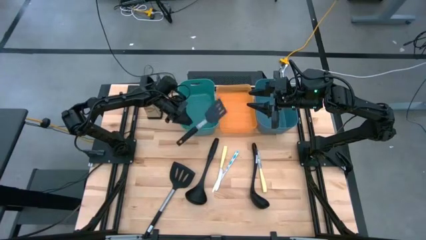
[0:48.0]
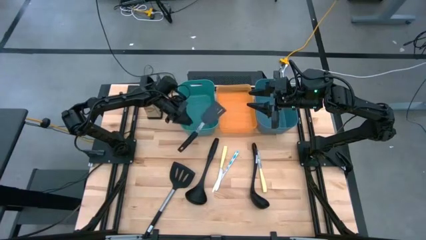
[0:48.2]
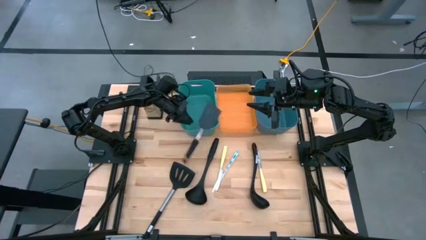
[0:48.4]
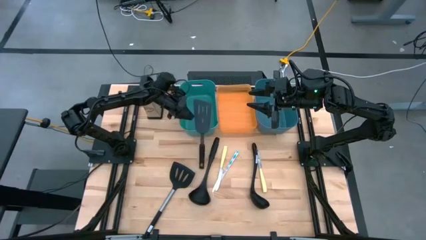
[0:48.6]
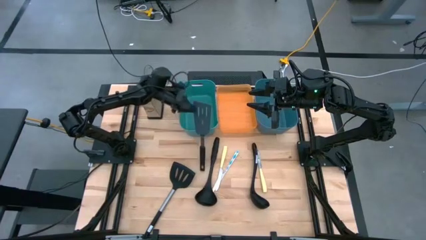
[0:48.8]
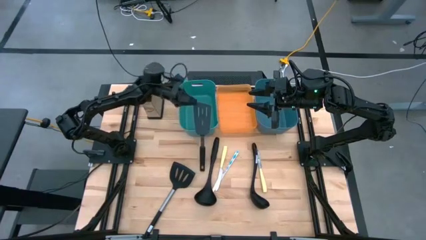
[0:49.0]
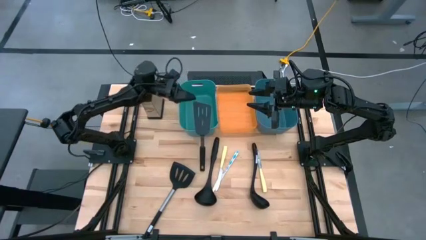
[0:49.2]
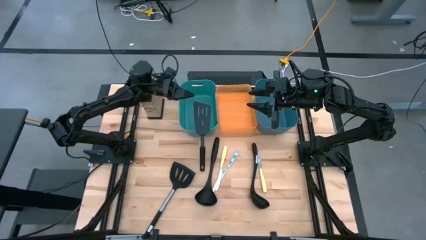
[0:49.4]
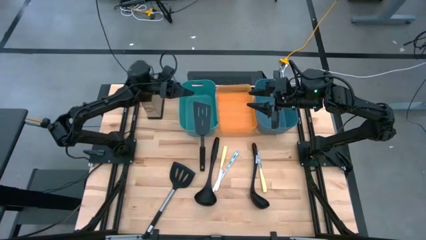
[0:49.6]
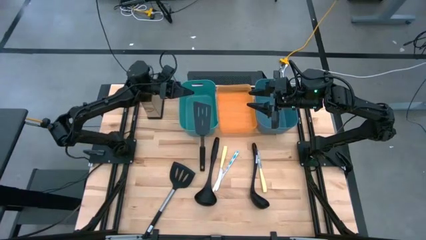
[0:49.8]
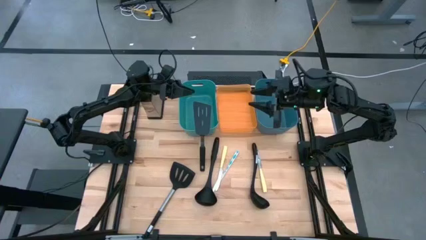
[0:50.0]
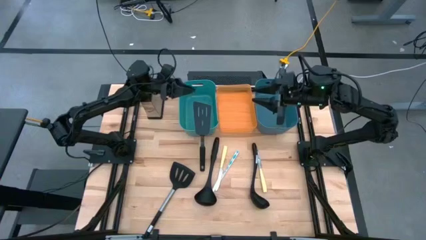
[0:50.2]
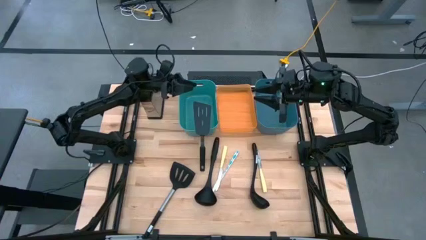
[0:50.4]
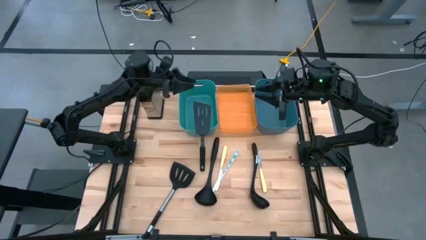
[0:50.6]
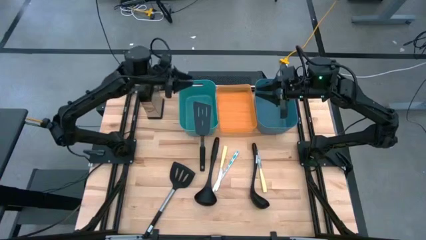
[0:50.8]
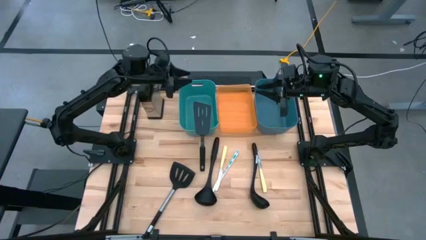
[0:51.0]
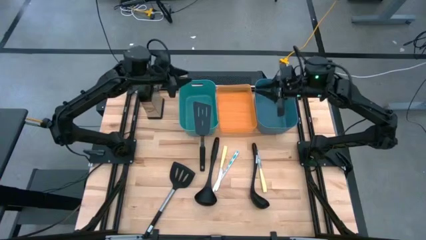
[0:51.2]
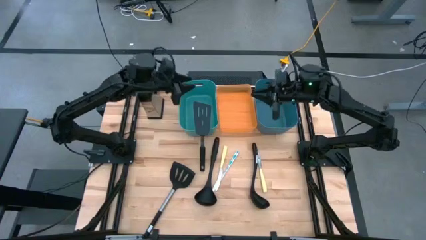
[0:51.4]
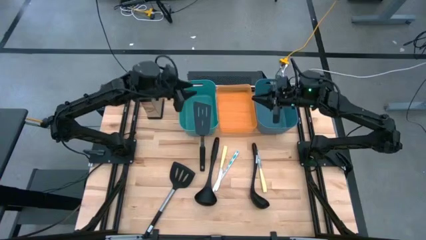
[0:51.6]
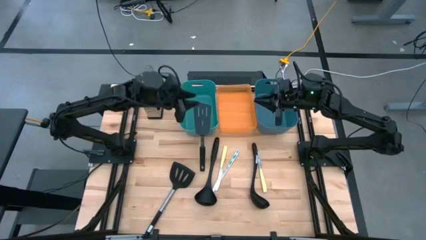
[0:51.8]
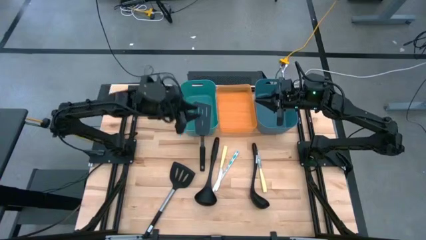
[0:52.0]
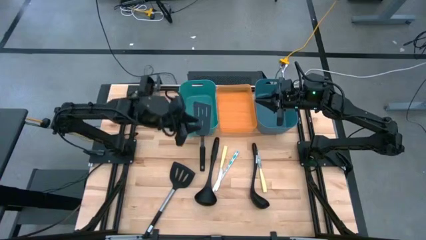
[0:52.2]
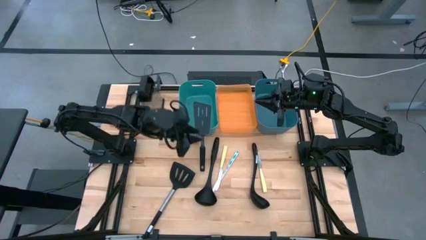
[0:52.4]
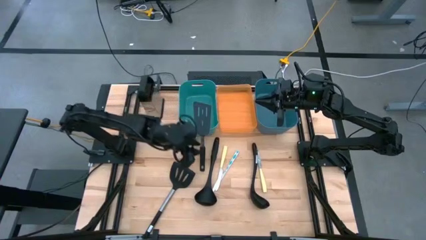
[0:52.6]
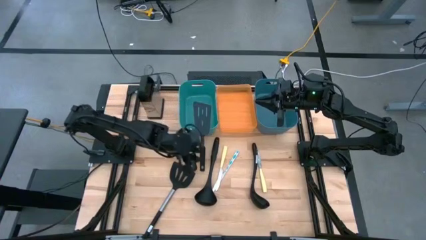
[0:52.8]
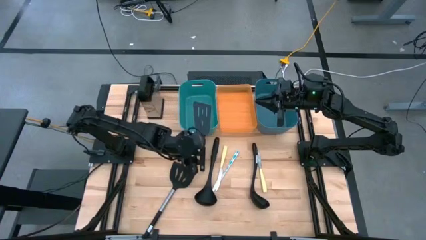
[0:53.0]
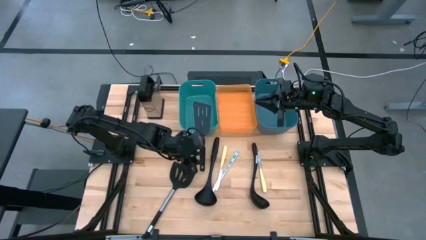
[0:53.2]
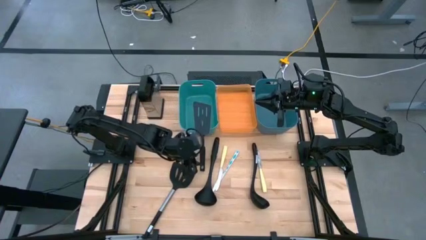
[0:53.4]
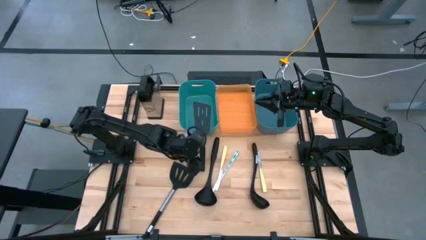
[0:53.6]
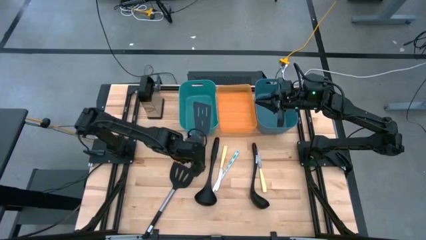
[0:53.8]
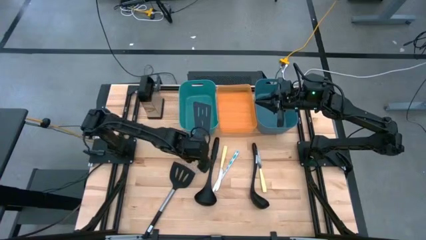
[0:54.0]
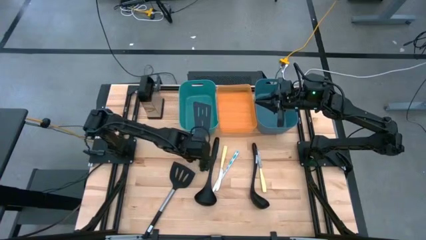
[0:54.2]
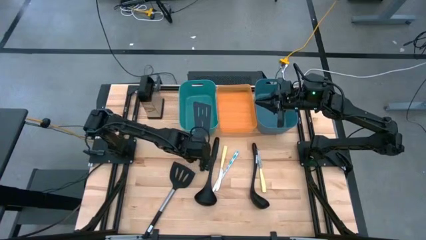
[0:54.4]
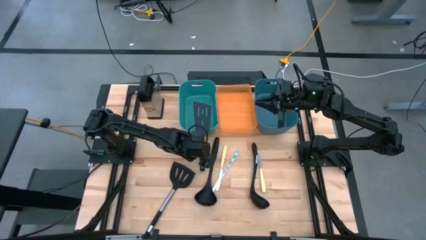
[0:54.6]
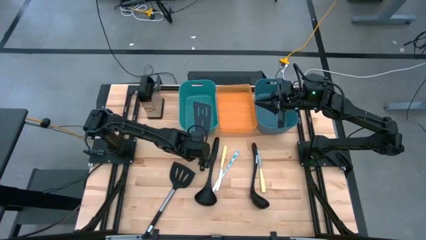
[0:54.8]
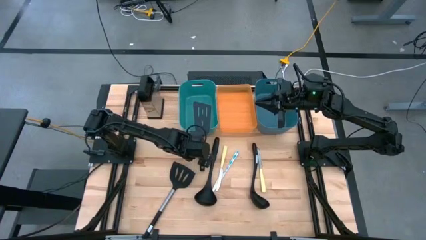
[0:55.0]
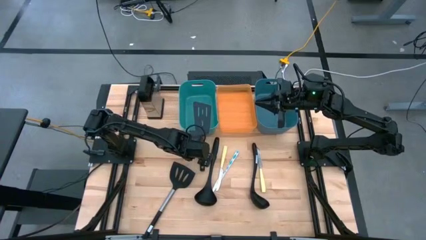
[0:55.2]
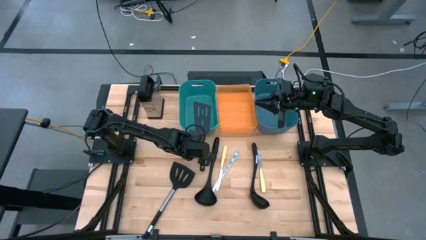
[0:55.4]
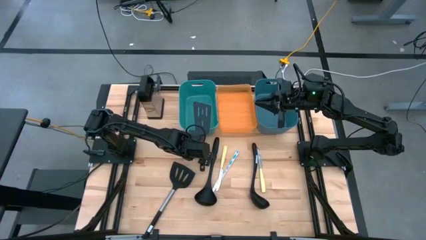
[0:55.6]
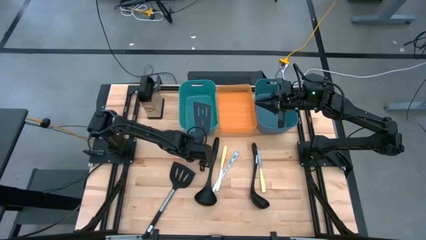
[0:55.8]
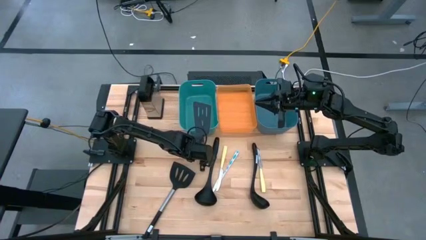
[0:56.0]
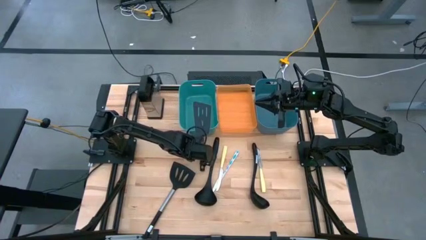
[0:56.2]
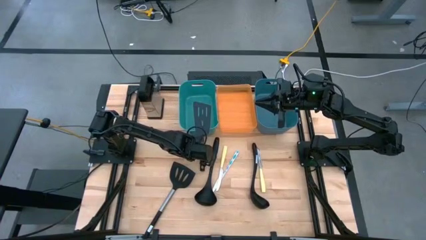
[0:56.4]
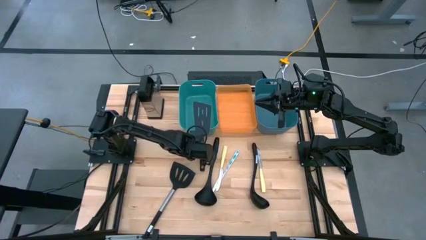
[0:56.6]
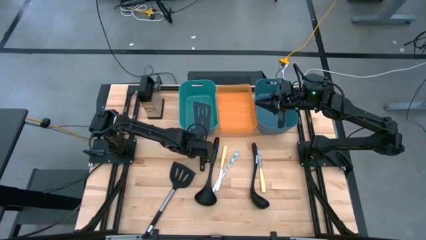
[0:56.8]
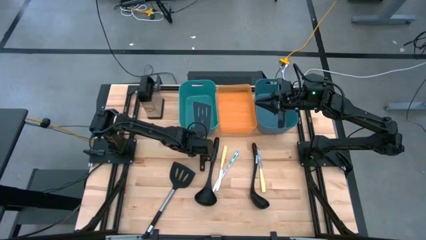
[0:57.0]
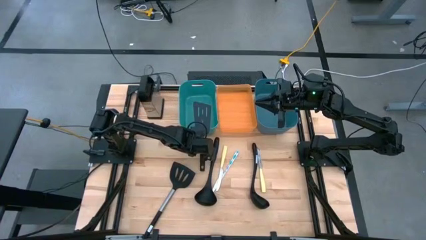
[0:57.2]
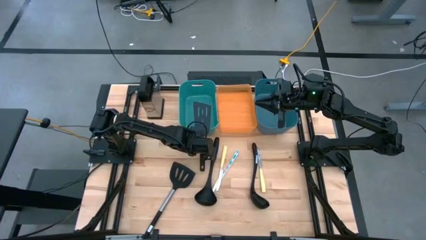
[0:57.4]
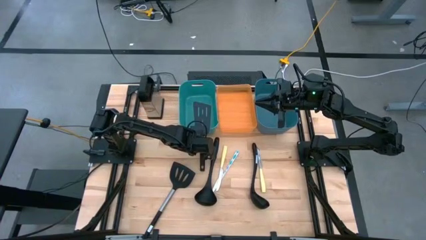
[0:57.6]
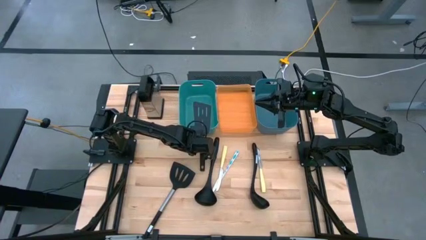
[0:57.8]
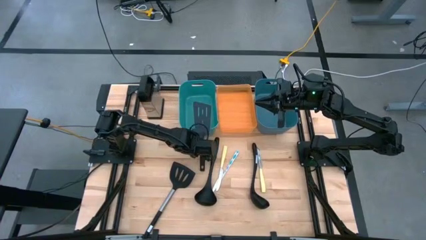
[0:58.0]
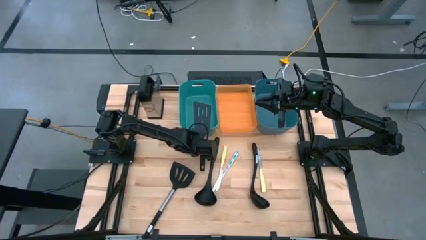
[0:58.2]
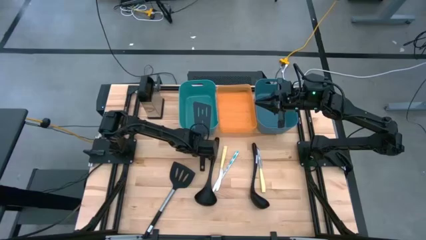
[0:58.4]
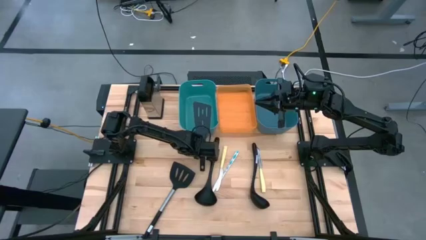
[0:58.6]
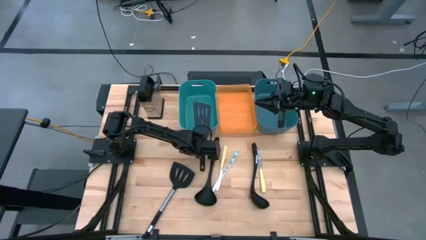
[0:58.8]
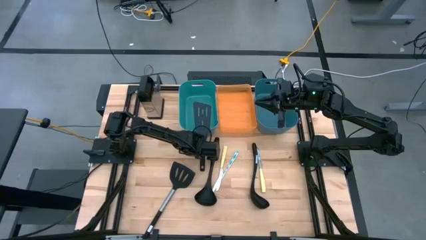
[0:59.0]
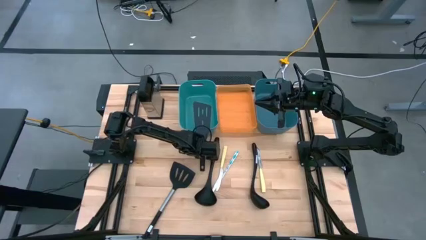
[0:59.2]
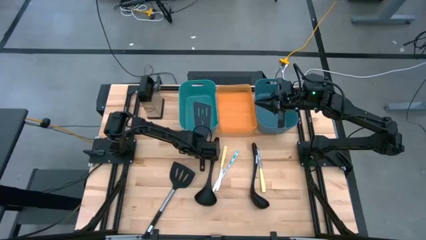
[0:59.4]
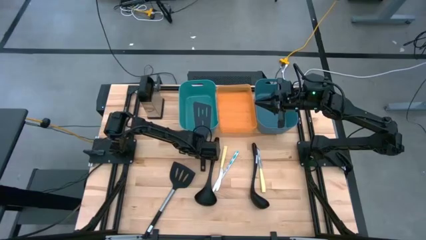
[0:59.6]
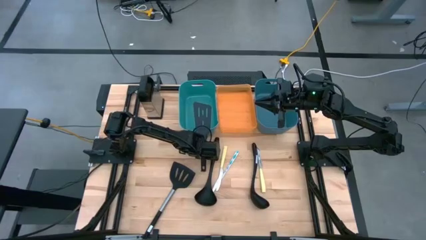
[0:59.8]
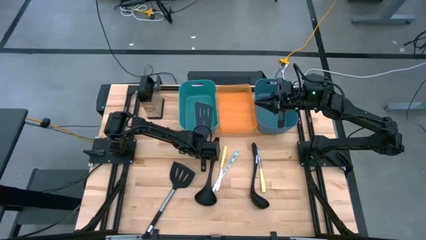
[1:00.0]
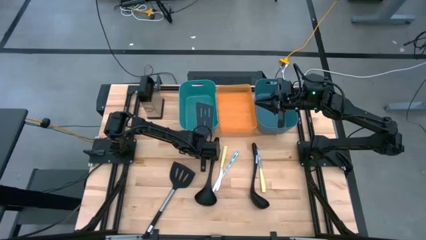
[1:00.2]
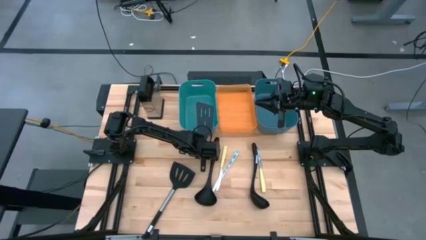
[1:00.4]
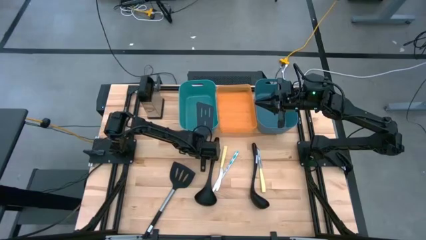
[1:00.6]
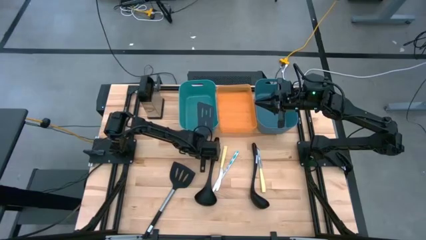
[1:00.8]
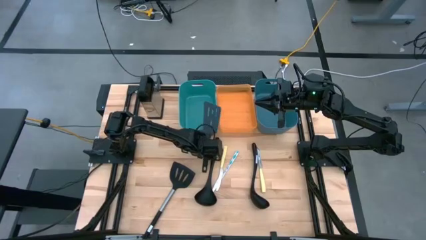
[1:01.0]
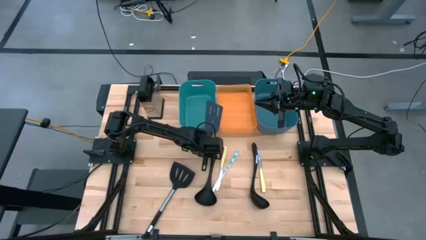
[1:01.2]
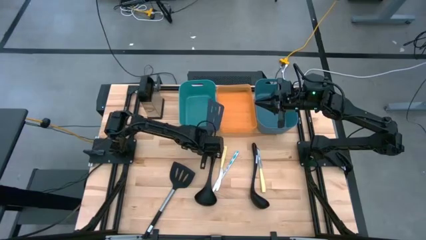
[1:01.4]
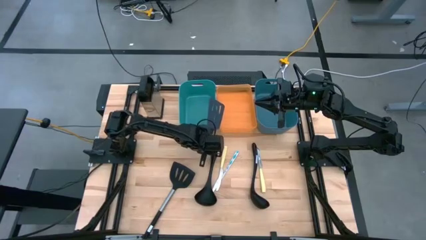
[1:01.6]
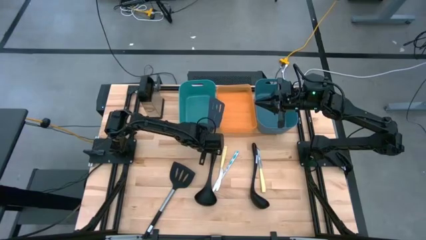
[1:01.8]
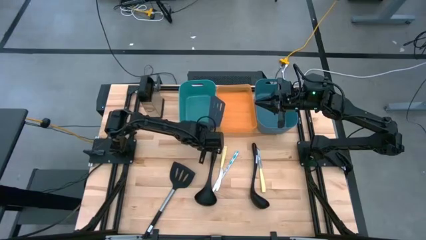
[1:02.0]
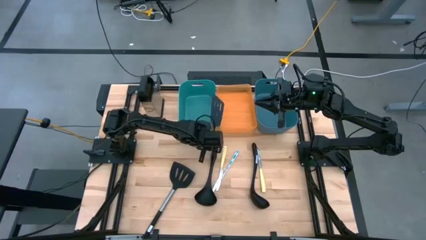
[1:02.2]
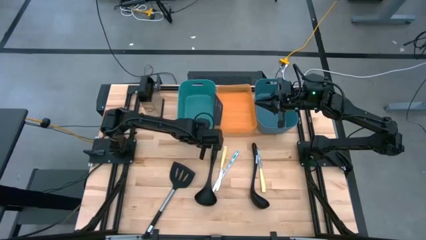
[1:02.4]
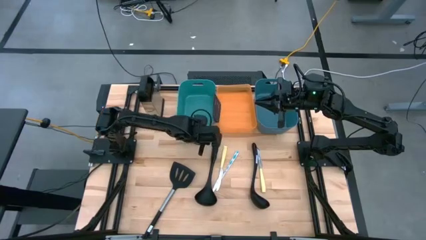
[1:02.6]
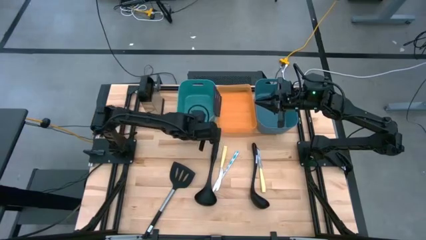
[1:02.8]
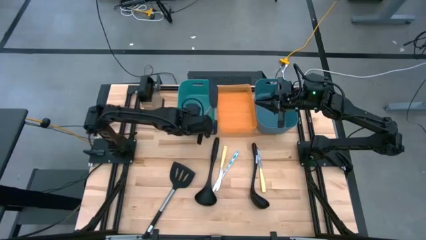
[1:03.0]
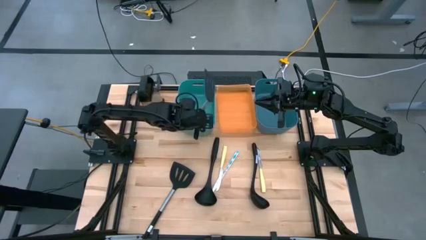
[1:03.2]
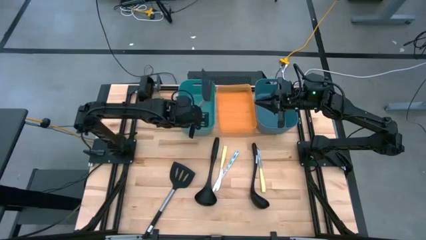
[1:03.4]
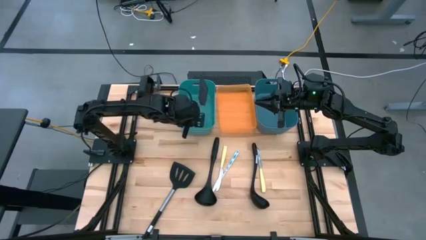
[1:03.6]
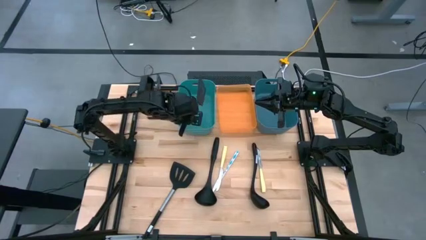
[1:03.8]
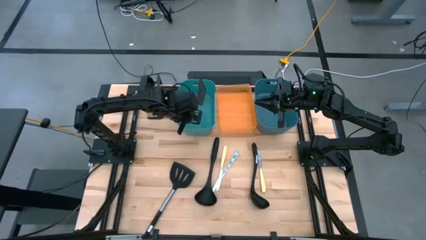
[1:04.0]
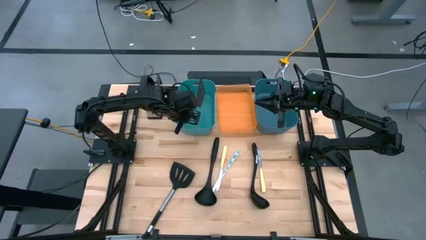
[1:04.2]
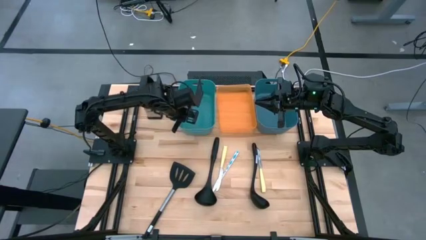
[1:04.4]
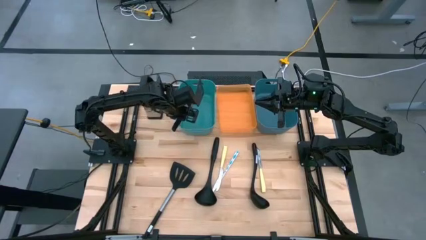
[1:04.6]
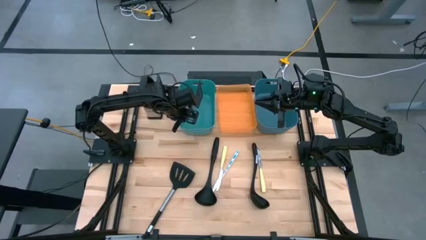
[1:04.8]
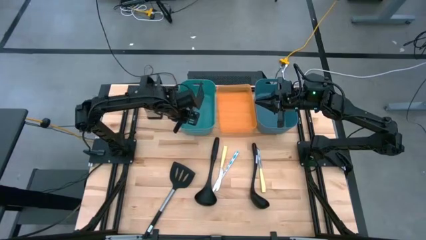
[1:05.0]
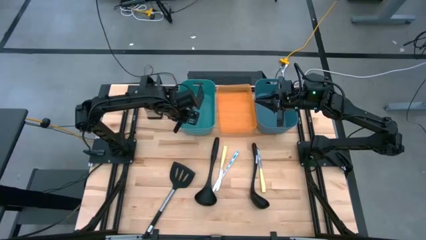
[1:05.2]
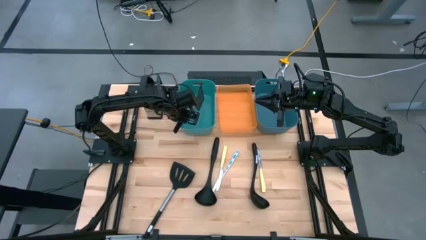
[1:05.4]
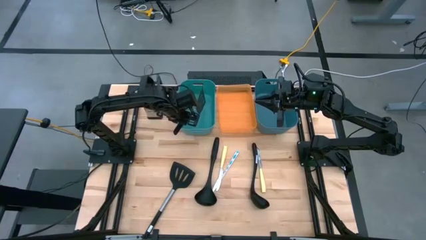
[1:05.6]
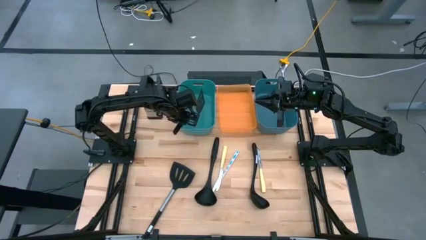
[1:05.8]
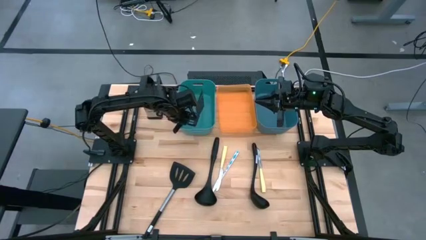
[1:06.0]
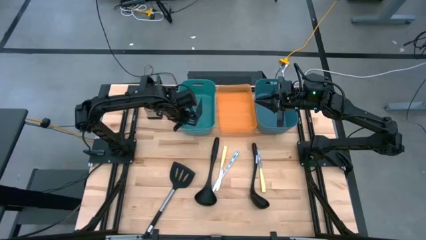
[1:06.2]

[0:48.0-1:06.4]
Task: Pick & Place Kitchen Items
Put the top black spatula into the green bin
